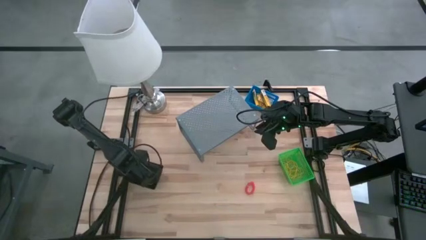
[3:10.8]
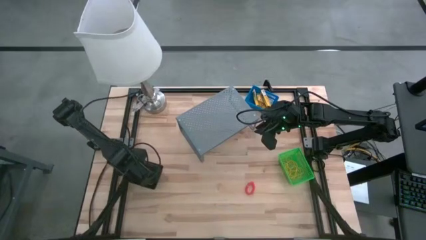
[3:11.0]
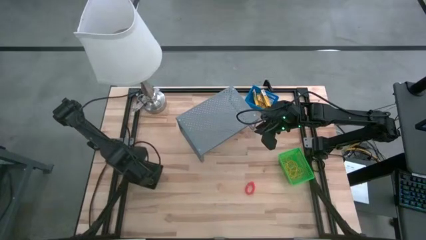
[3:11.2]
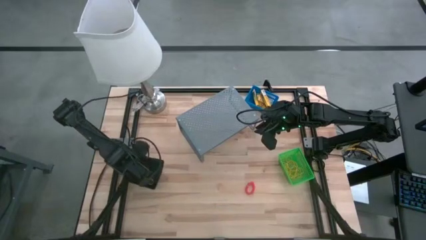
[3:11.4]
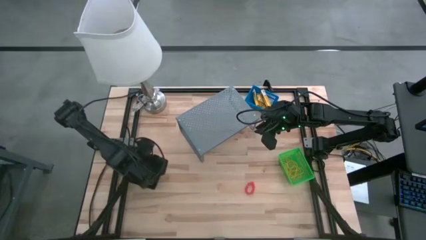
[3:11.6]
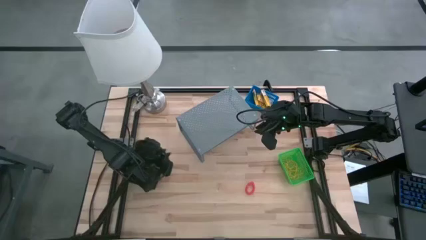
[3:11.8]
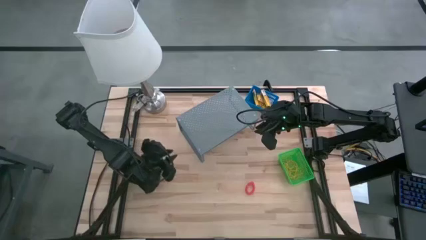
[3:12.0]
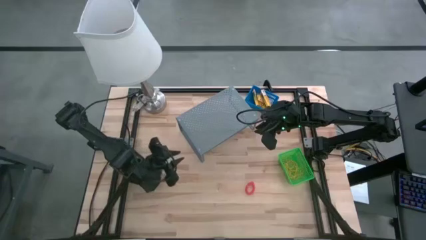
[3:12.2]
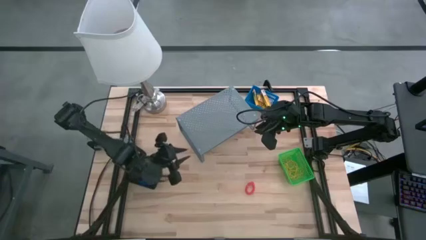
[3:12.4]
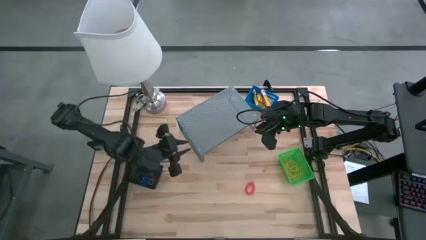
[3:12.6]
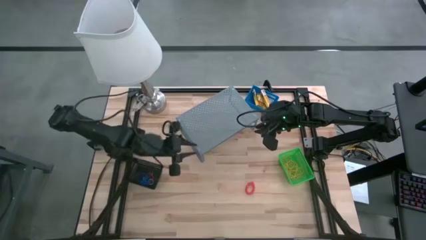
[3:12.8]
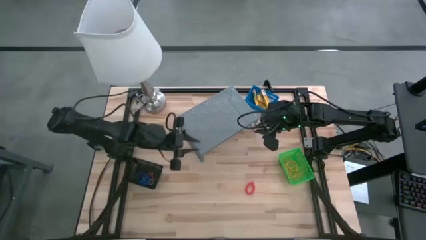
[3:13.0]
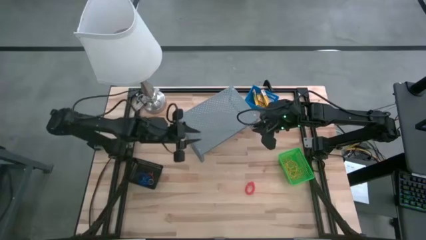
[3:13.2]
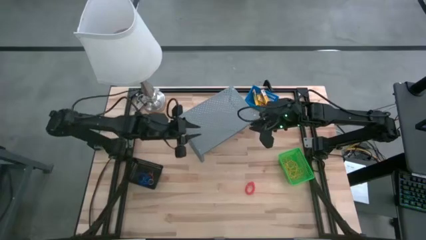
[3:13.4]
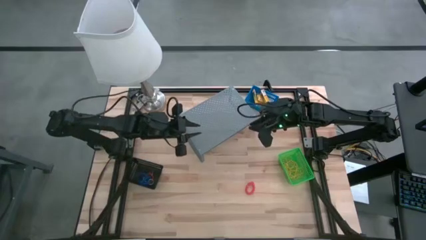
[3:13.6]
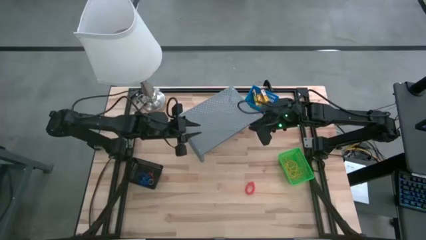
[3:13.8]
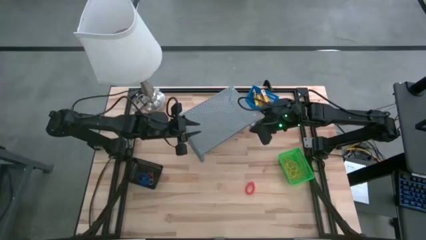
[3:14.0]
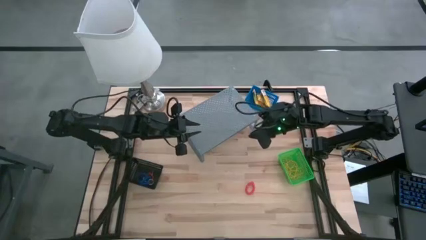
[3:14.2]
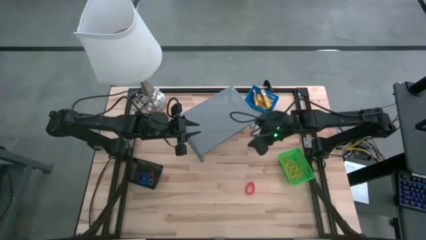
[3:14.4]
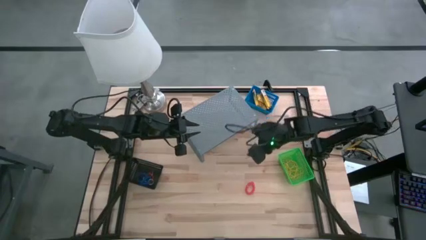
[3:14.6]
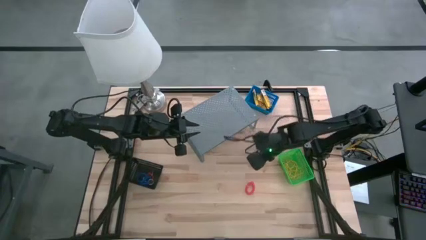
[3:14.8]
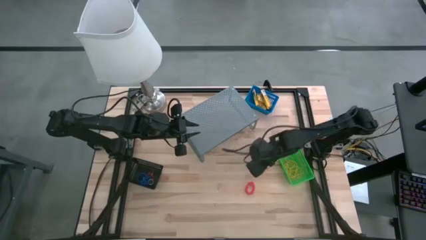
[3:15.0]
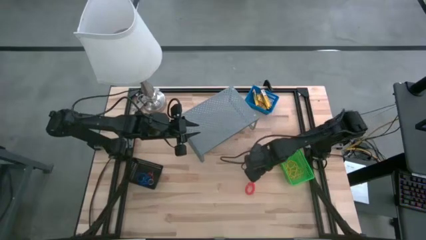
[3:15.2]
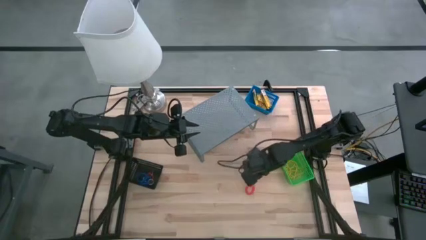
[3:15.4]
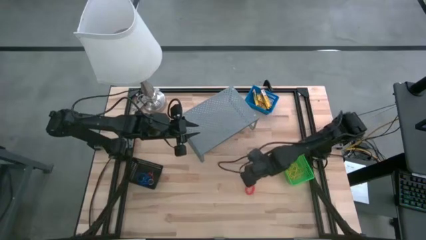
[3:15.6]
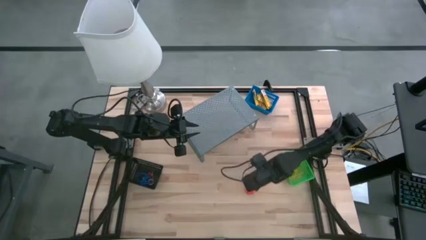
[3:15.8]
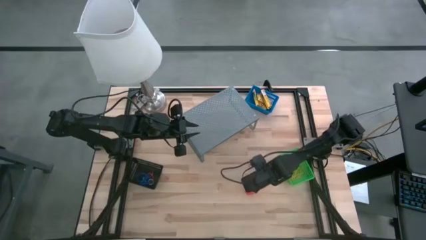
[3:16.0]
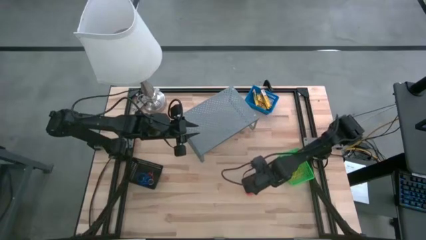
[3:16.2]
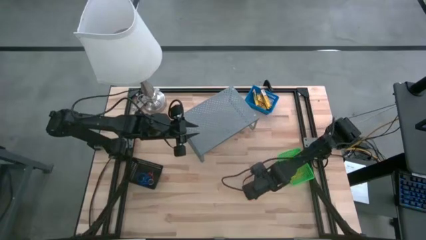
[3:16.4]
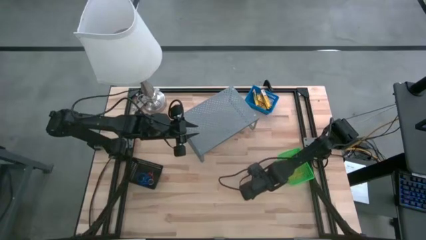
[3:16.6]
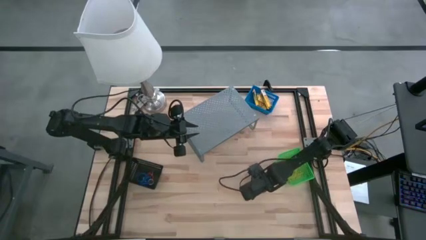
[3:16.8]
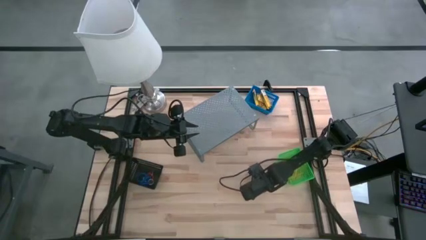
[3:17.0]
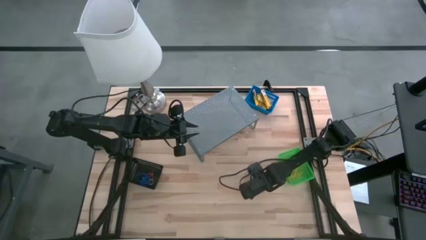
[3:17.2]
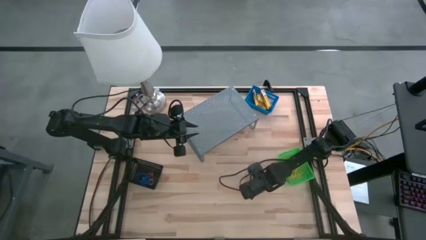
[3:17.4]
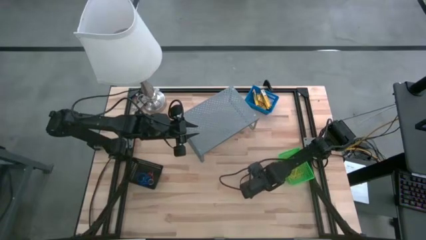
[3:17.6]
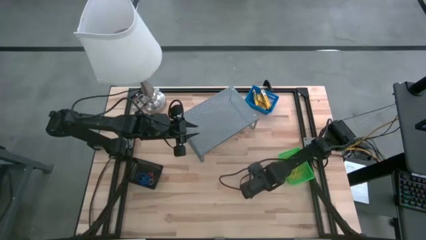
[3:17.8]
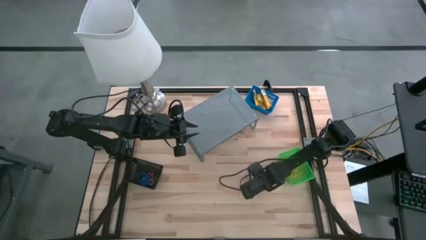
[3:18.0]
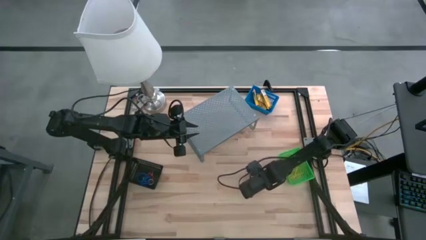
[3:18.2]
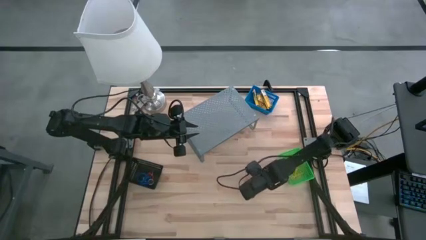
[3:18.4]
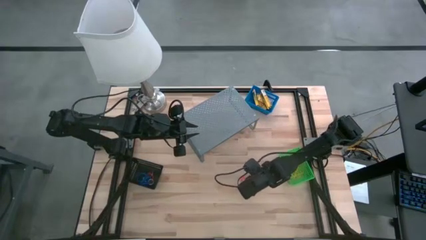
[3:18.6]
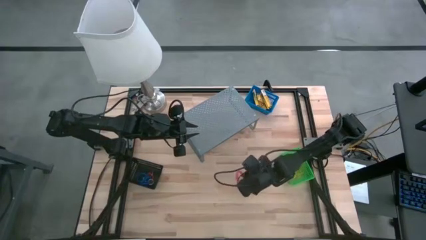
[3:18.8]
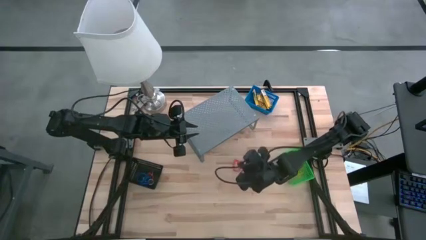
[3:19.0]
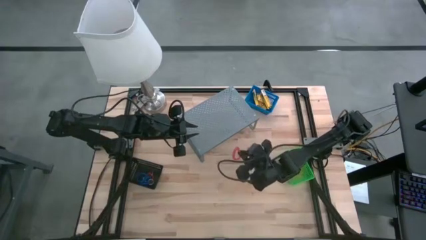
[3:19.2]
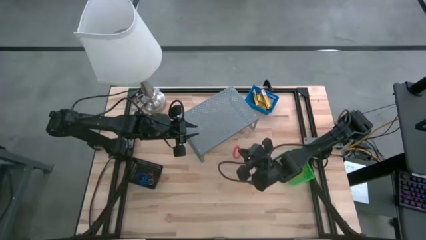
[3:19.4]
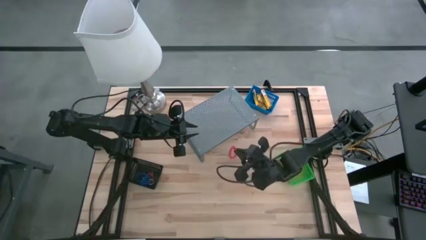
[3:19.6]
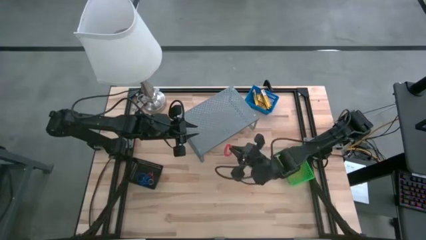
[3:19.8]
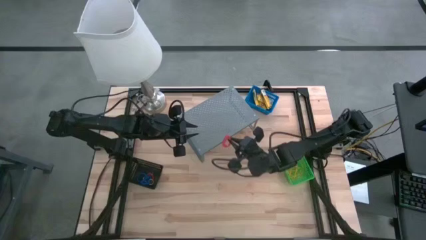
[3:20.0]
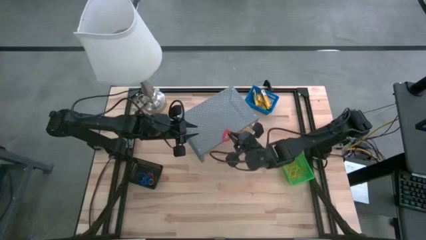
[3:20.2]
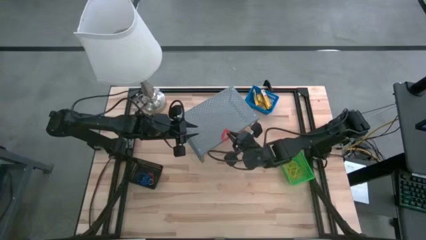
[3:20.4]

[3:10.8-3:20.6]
Task: Pick & Place Office Desk Supplies
Put the orange spring keychain into the black basket

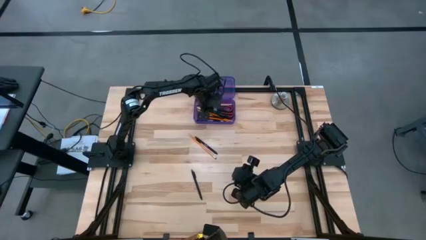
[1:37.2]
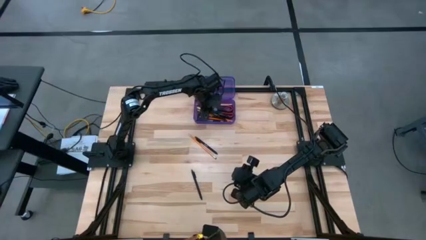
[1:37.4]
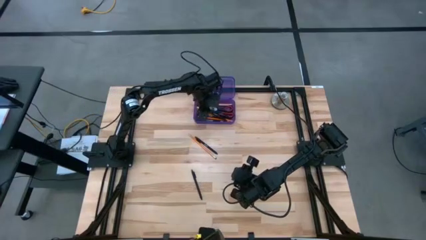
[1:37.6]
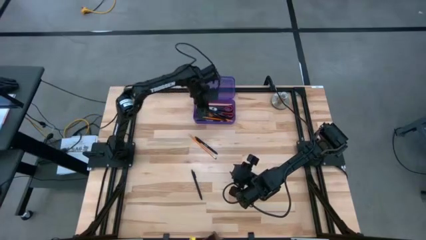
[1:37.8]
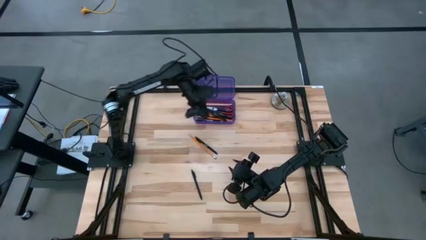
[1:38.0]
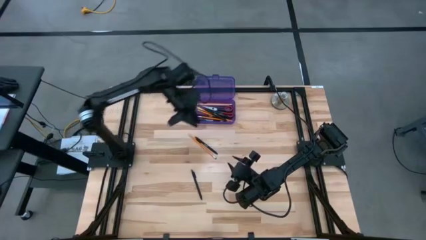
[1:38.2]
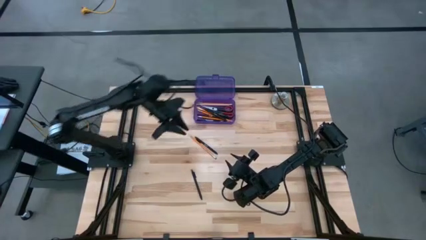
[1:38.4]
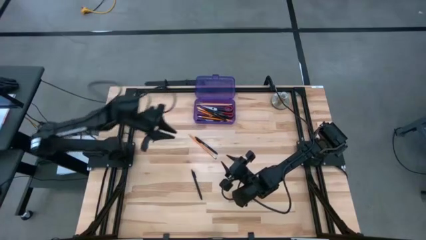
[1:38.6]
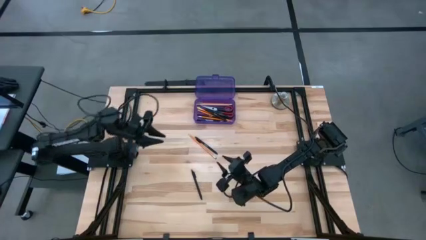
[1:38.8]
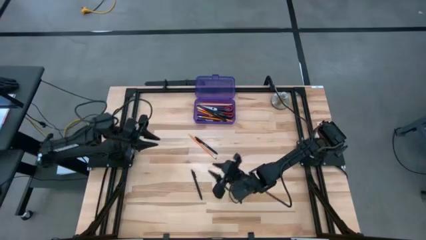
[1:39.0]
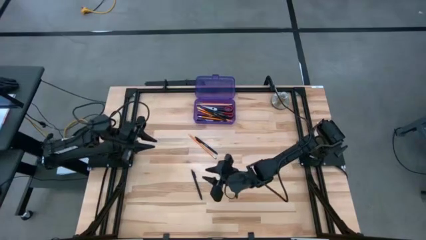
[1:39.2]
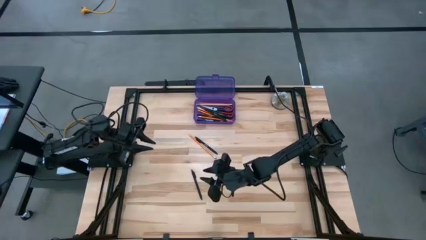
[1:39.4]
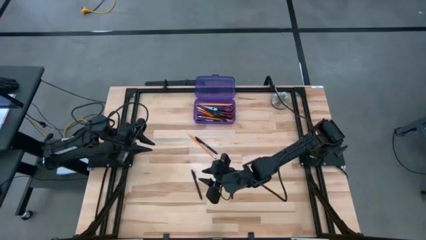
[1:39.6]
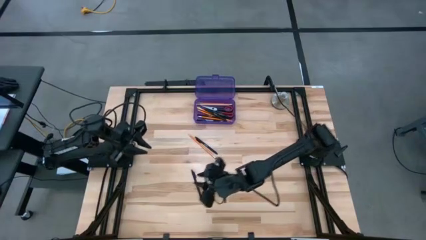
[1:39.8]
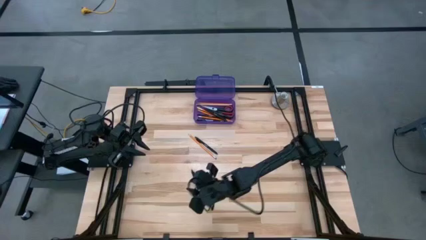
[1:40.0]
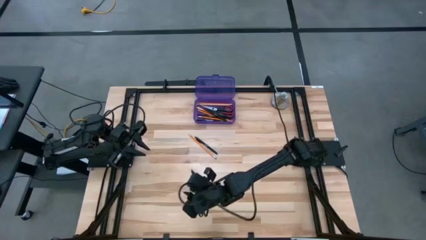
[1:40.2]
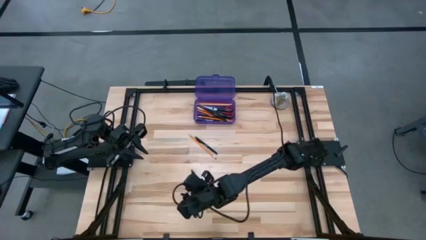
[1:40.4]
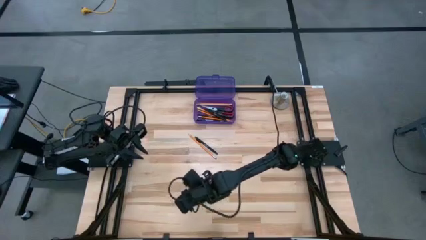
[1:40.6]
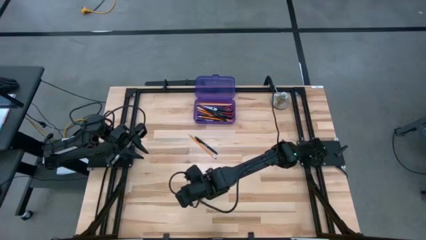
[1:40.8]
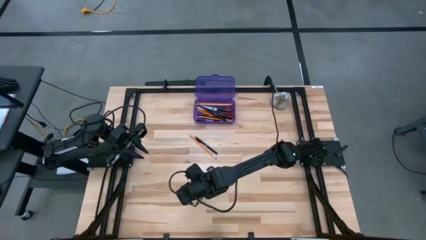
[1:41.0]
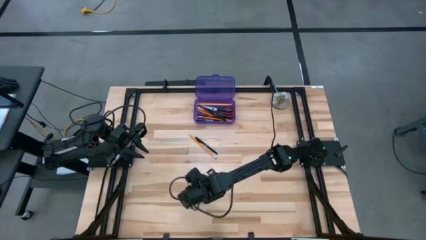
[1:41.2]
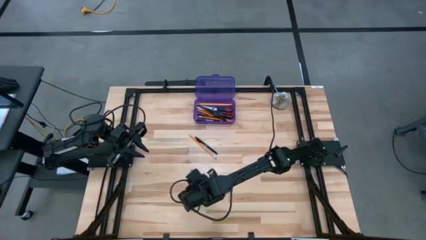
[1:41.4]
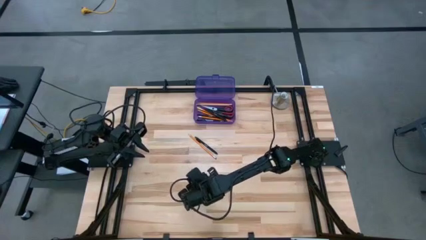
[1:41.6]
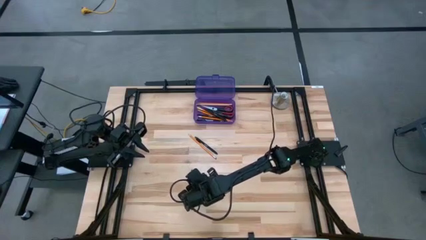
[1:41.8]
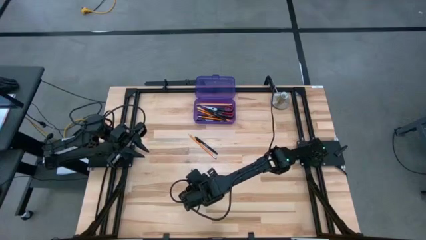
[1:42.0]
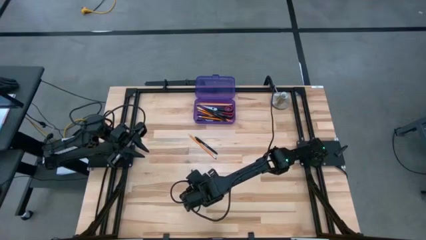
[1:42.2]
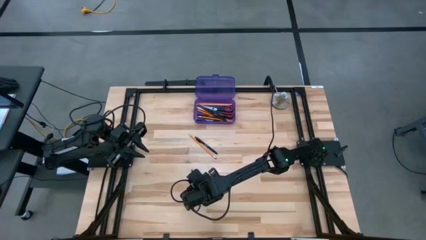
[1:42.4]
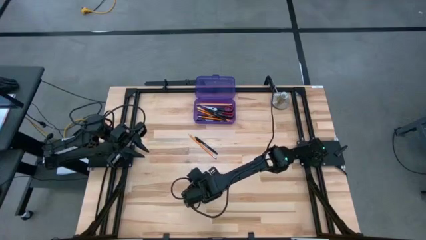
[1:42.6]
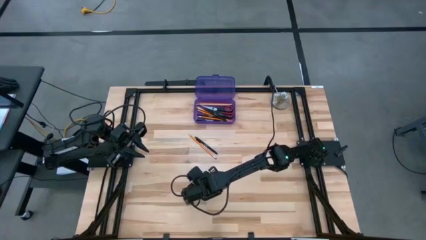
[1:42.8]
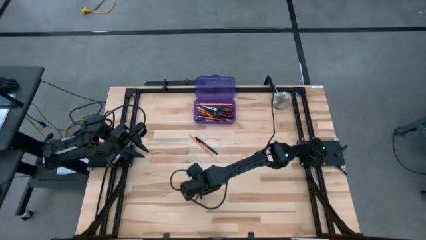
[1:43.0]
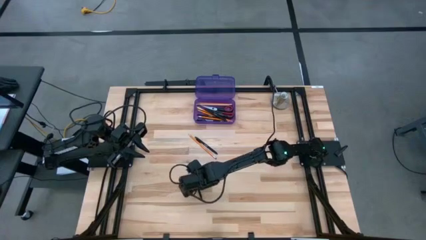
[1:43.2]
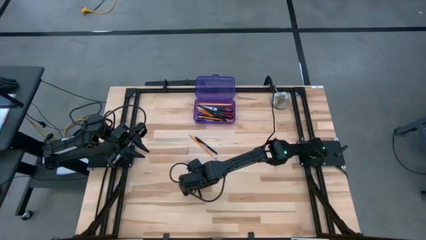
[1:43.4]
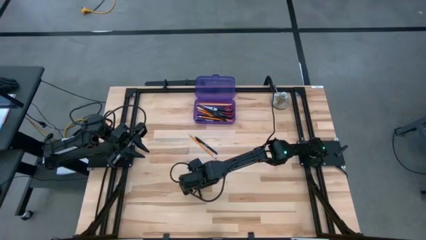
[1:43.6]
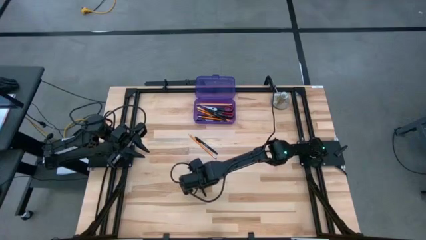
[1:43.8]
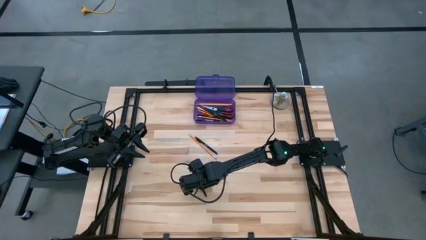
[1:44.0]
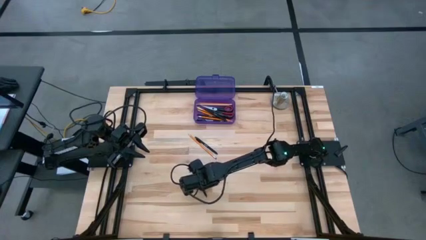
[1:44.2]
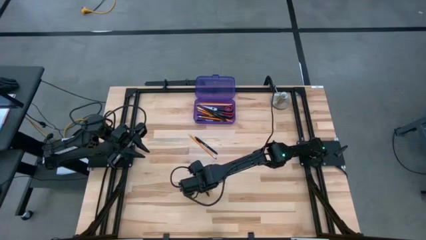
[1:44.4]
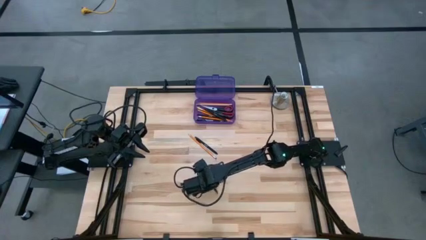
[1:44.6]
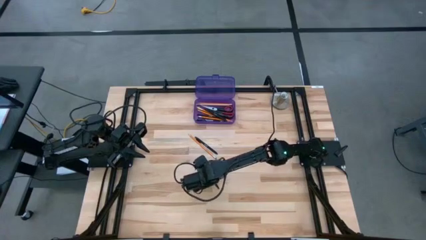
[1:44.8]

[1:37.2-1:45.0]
Task: Pick & place school supplies into a supply box
Put the black pen into the violet supply box
